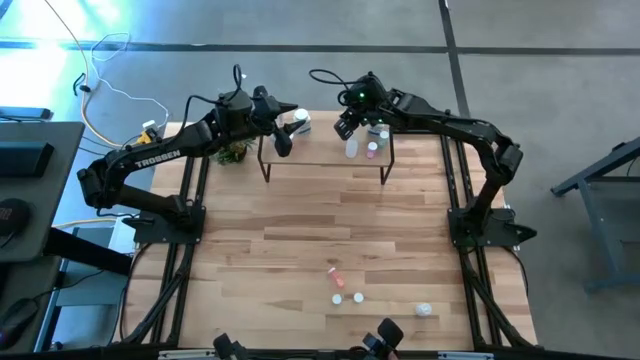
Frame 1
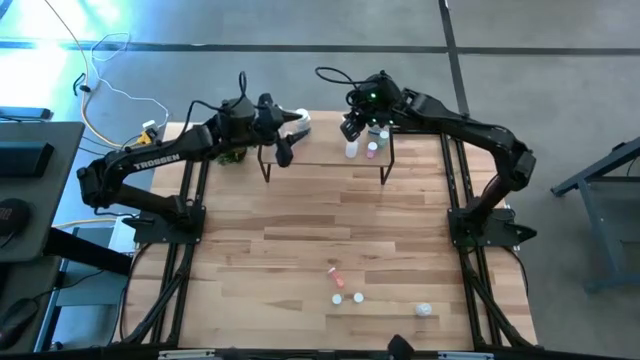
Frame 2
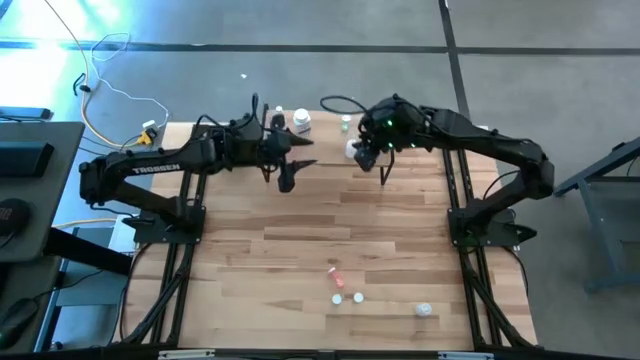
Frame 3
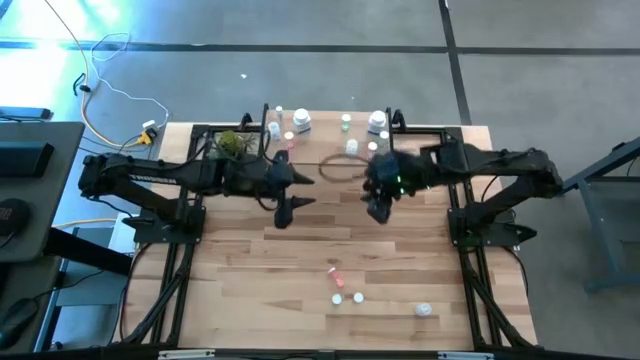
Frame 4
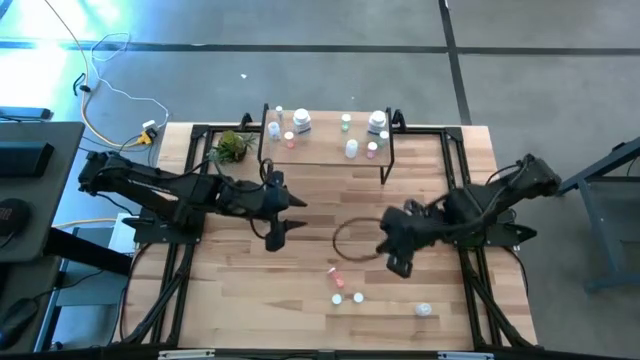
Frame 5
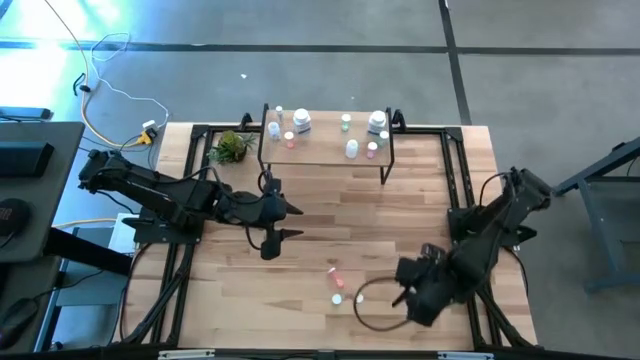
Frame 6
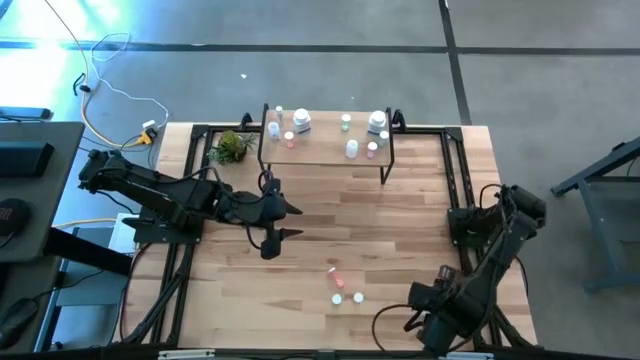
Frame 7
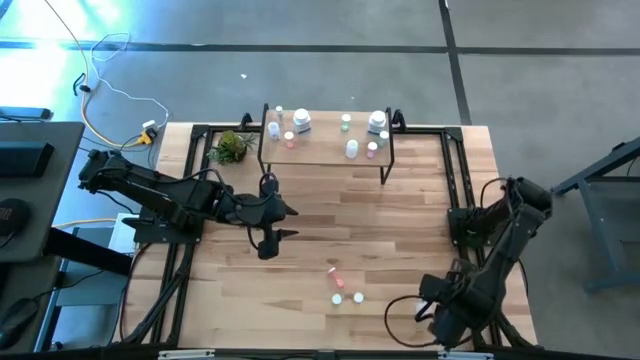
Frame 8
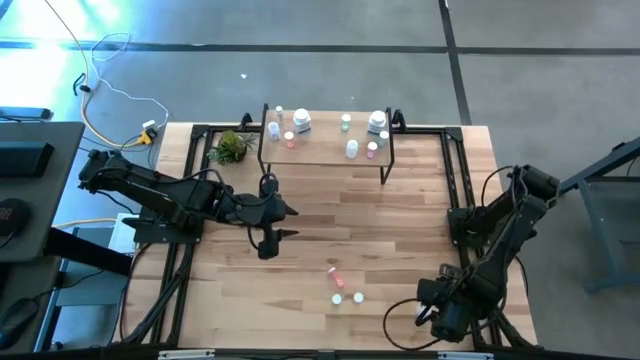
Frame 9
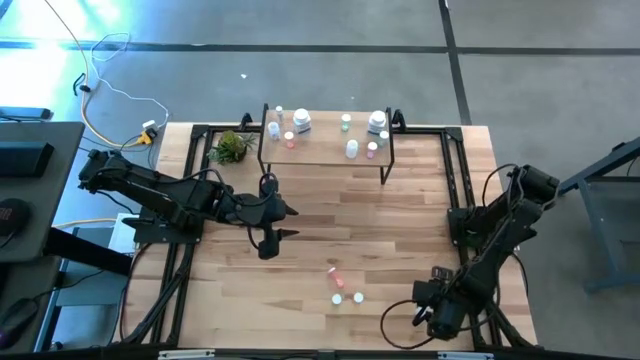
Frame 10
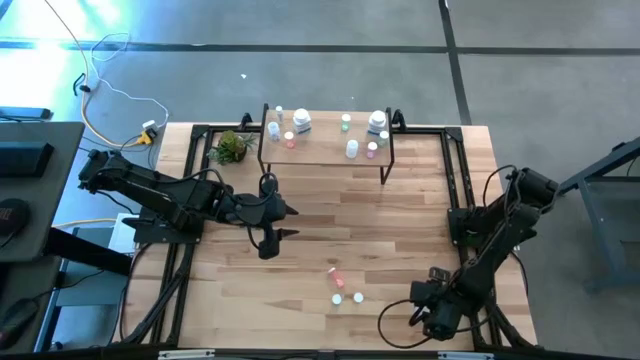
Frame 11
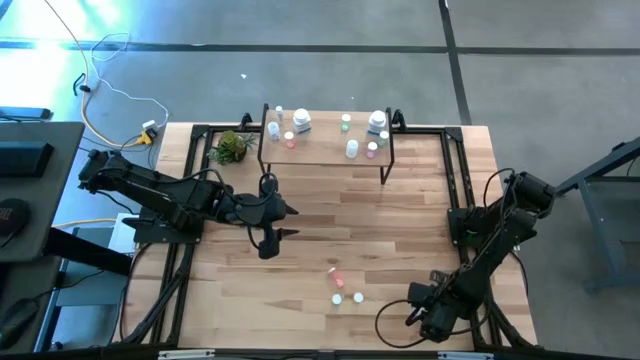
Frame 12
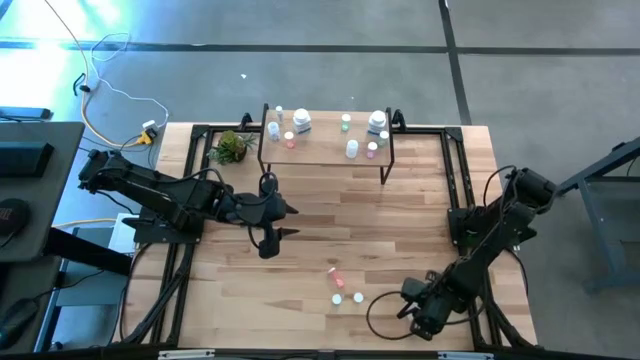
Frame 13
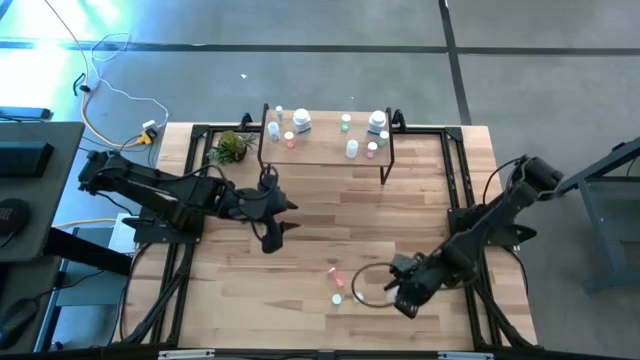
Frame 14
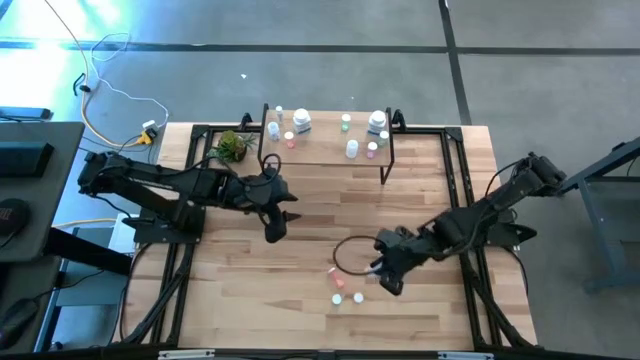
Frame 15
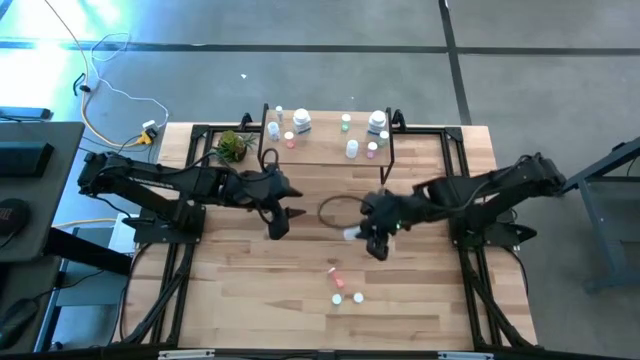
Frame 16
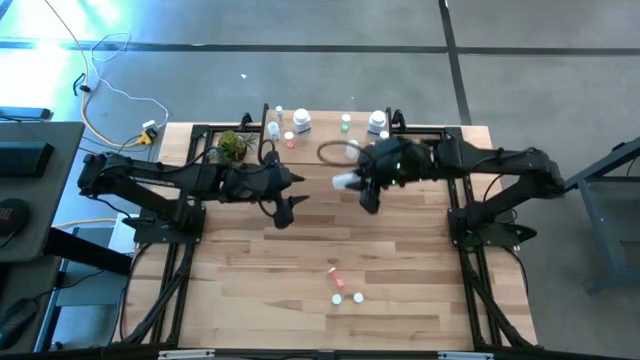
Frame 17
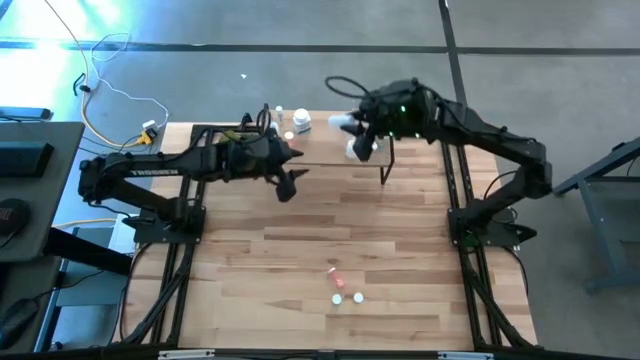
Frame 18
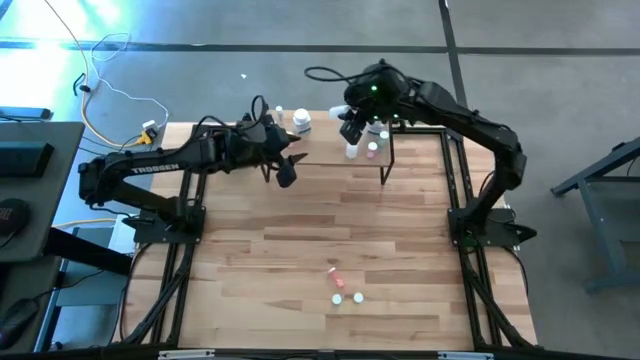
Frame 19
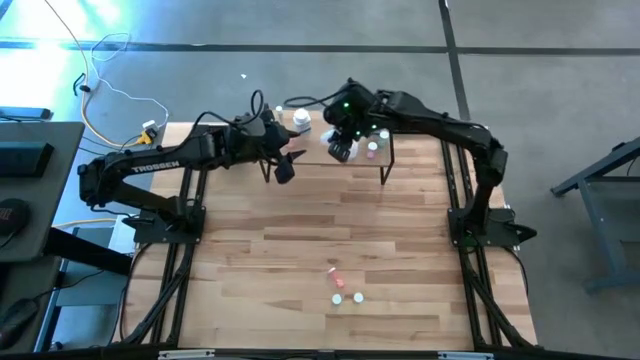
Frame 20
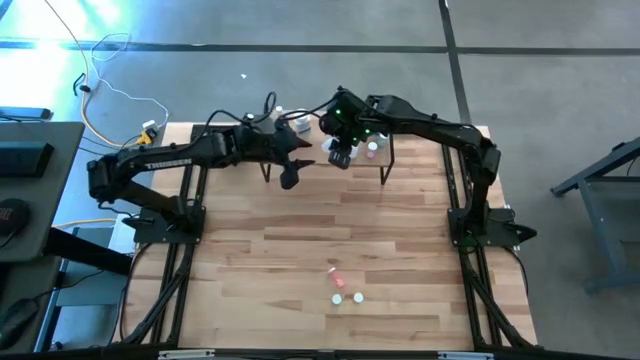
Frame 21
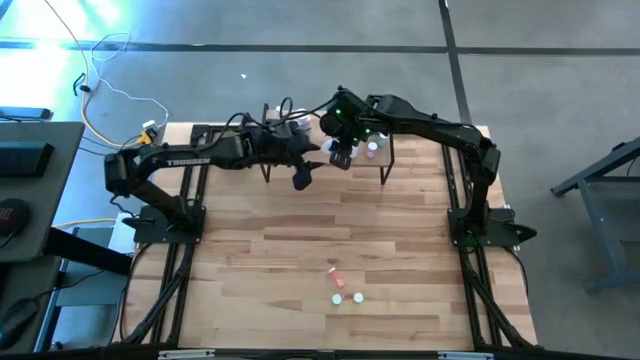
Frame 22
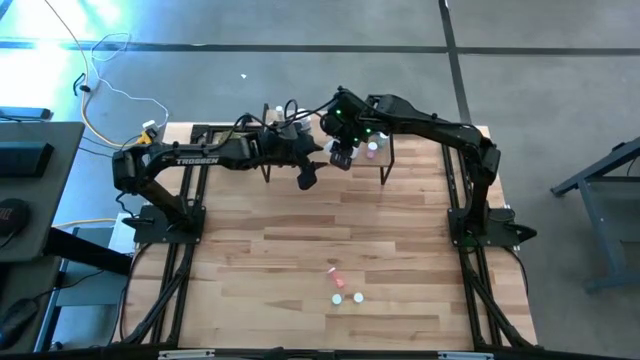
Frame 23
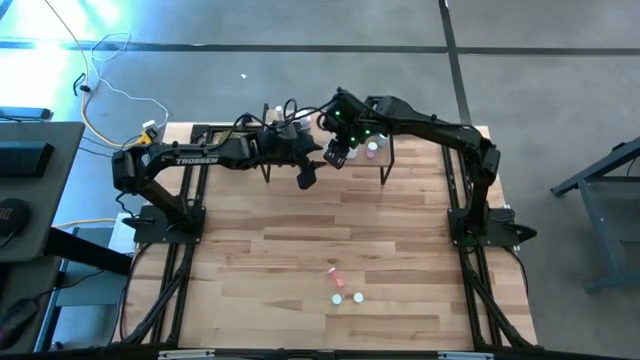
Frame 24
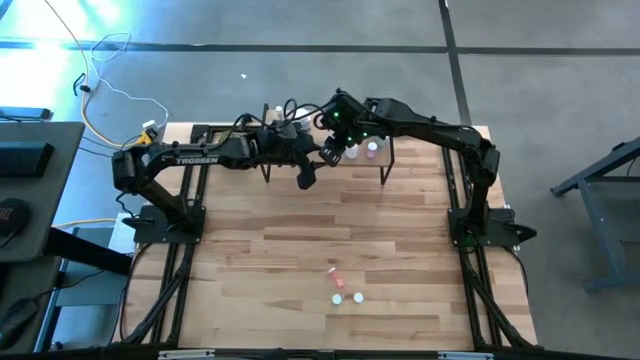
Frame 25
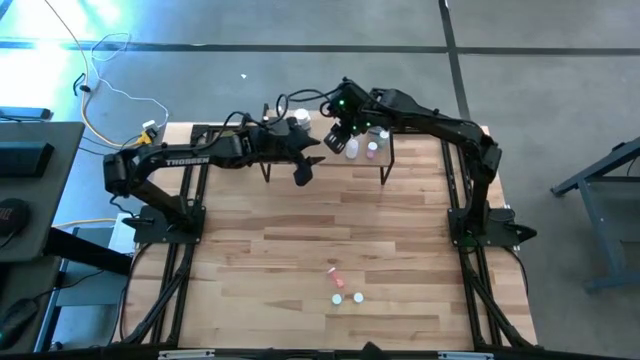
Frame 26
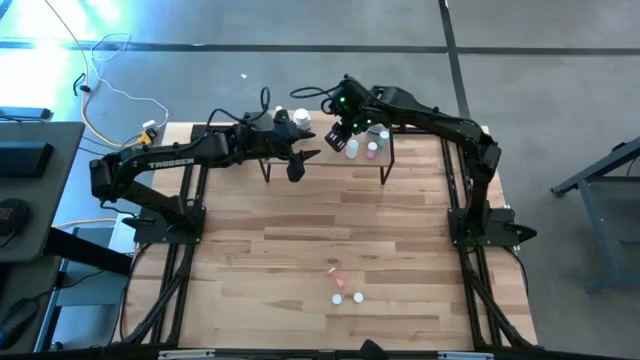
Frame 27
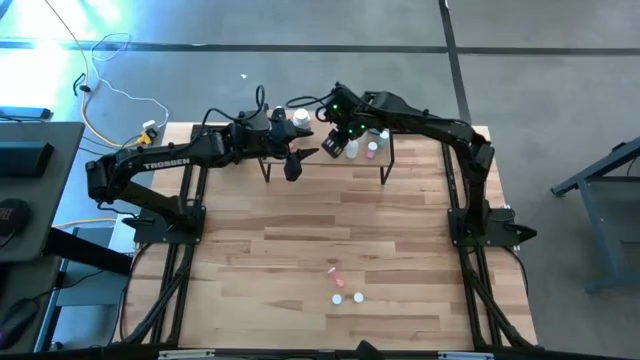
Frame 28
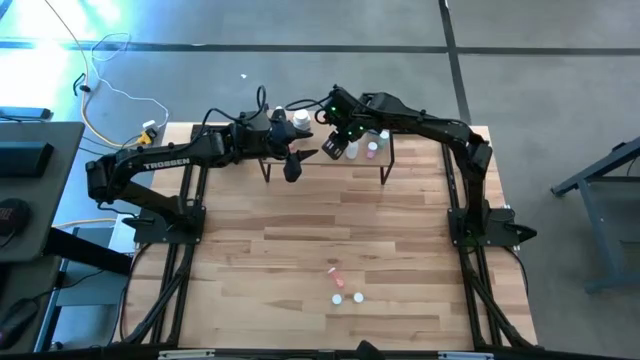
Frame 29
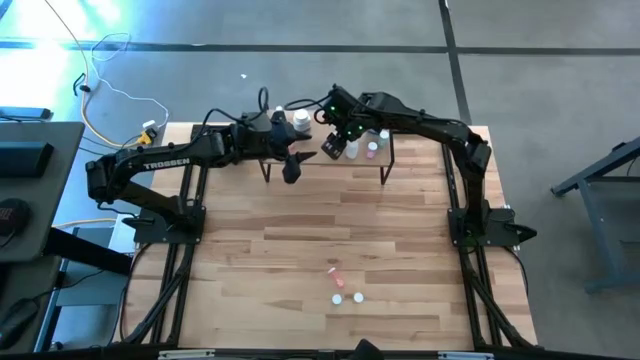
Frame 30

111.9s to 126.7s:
Task: Pick and place medicine bottles onto shelf by color
Put the transparent pill bottle on the shelf

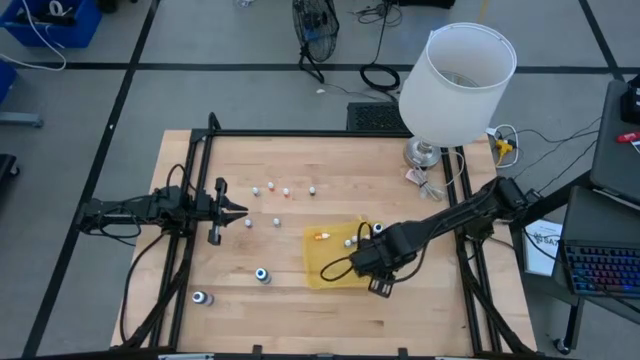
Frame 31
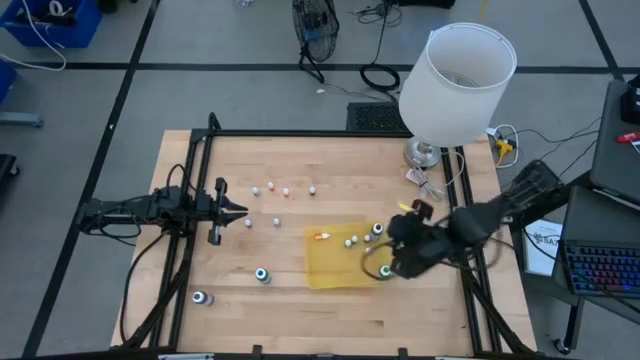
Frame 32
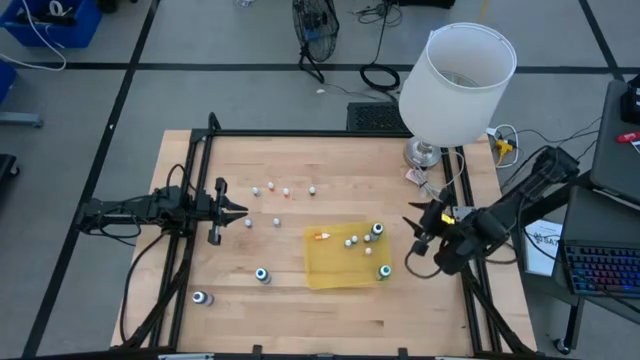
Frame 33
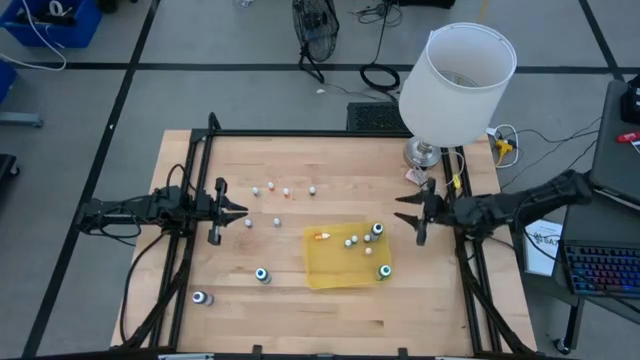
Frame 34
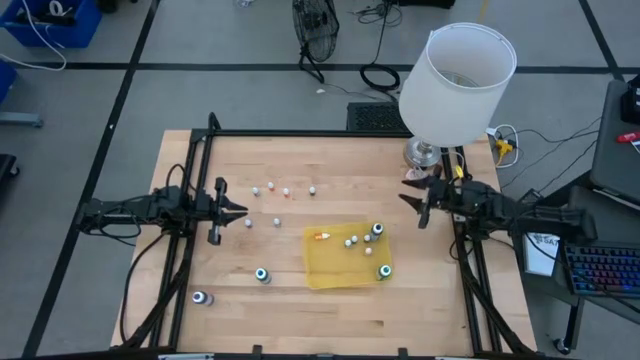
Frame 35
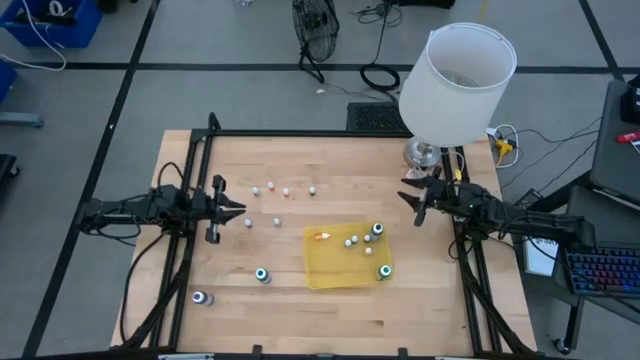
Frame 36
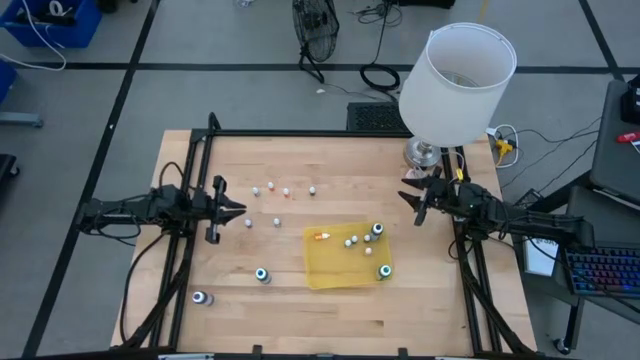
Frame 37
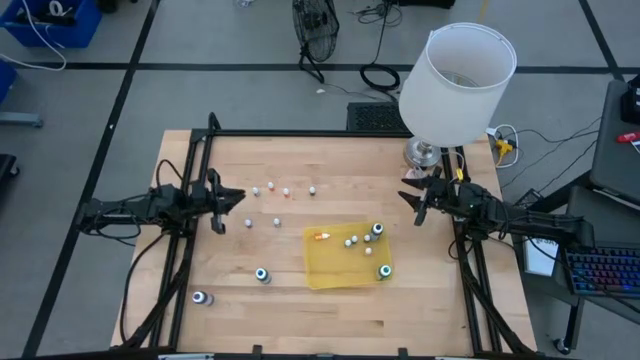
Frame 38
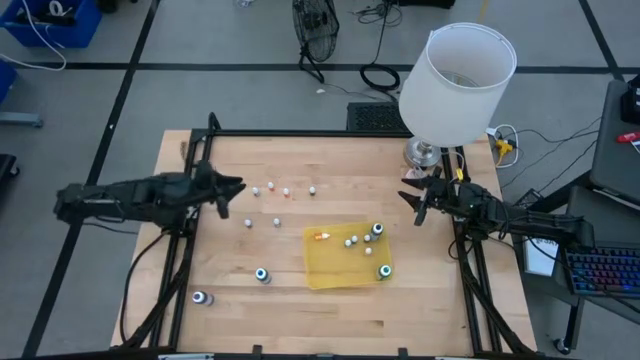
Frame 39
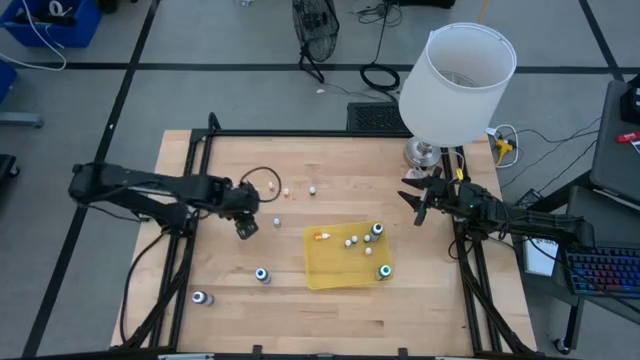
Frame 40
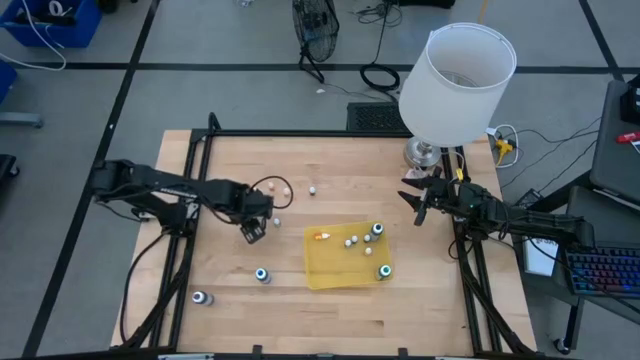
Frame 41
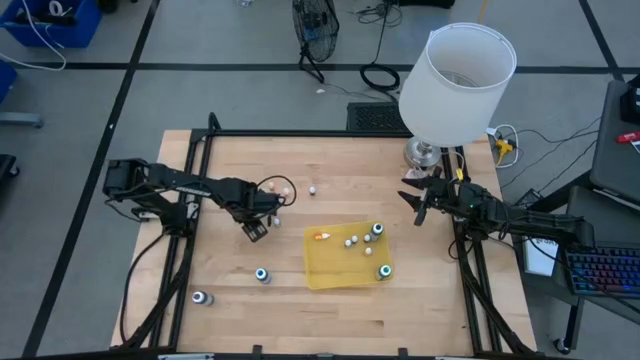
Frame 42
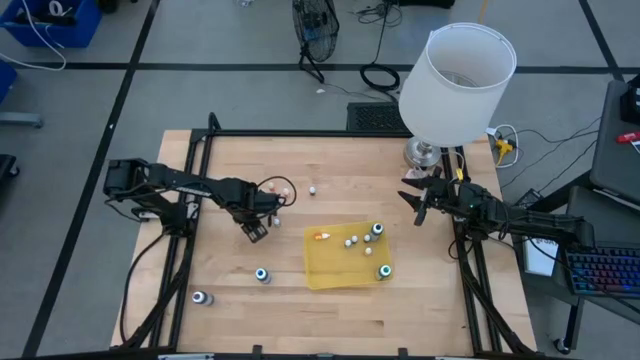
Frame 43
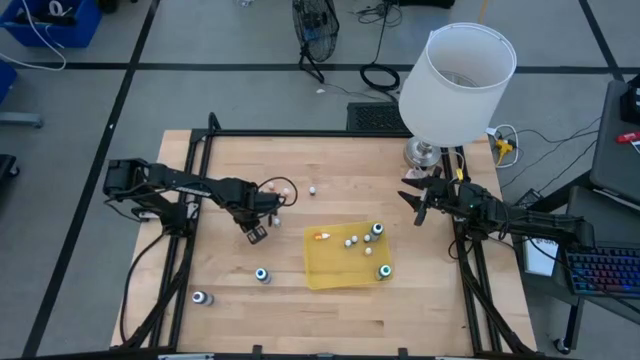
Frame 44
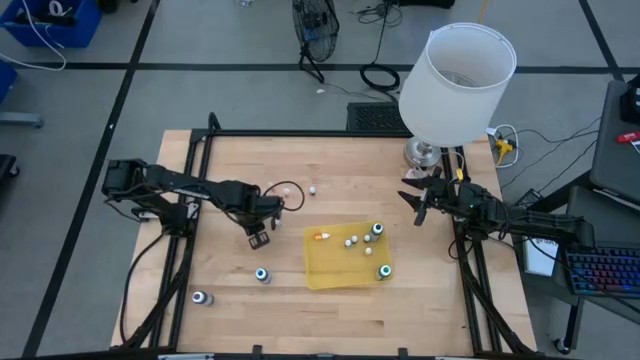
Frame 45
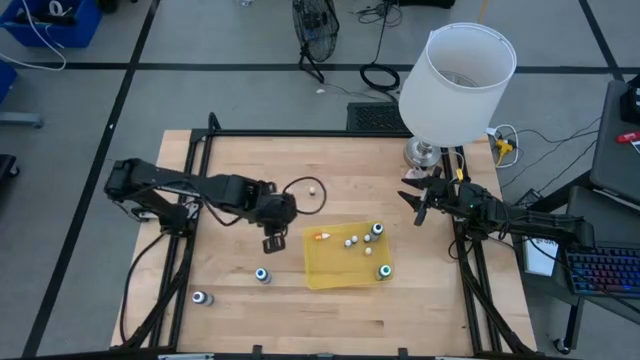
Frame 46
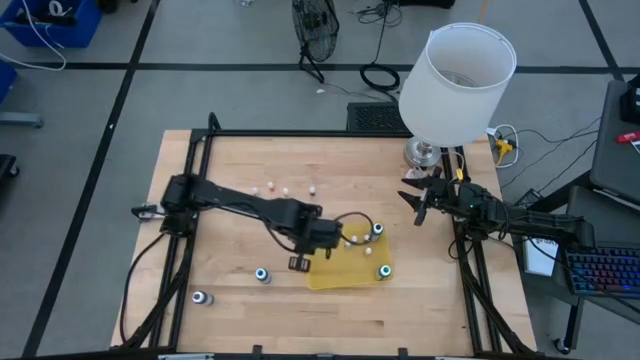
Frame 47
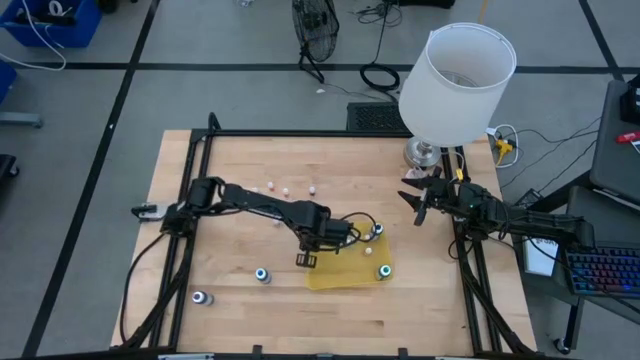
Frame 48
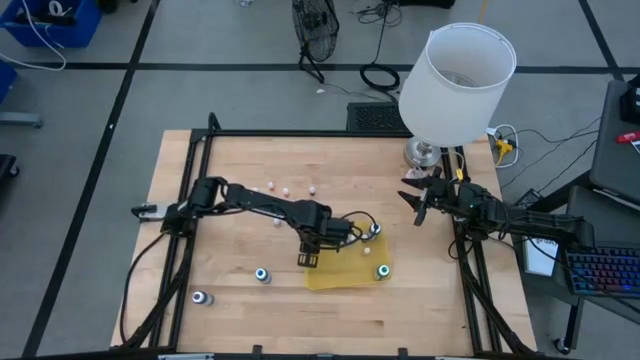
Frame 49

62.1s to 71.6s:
Task: Pick & Place food coloring
Put the left small black food coloring bottle into the yellow bin
